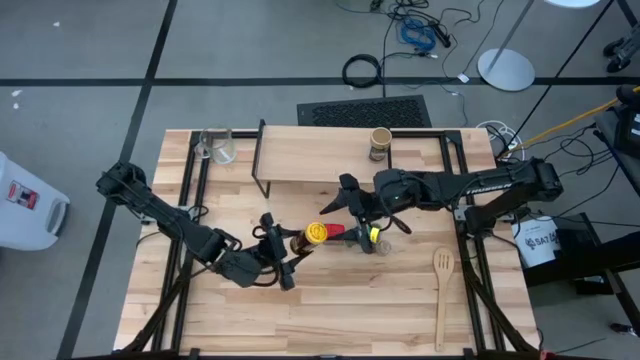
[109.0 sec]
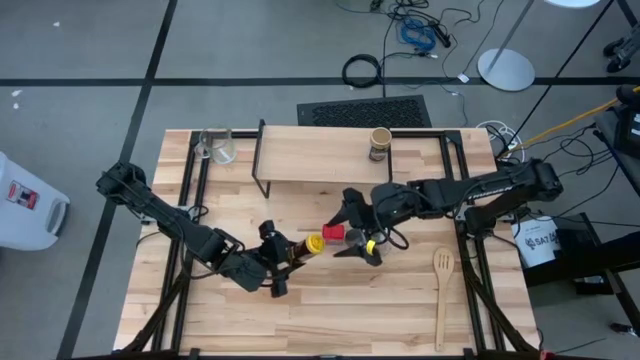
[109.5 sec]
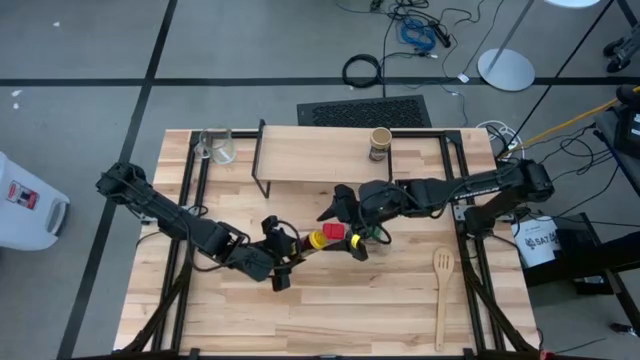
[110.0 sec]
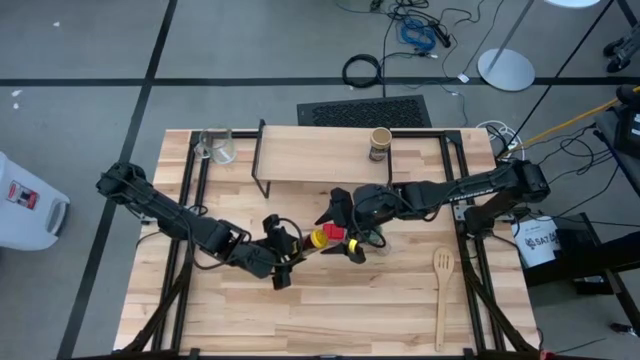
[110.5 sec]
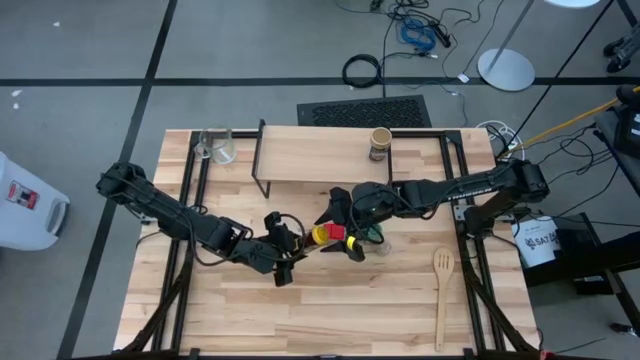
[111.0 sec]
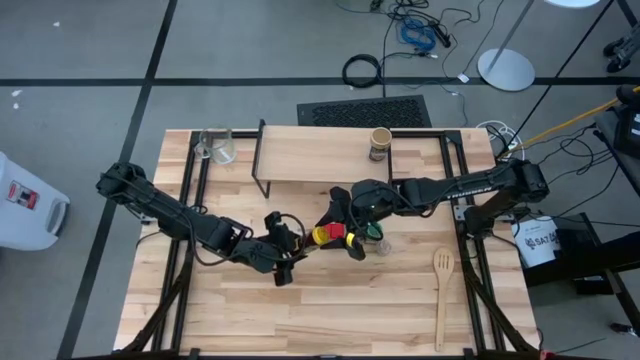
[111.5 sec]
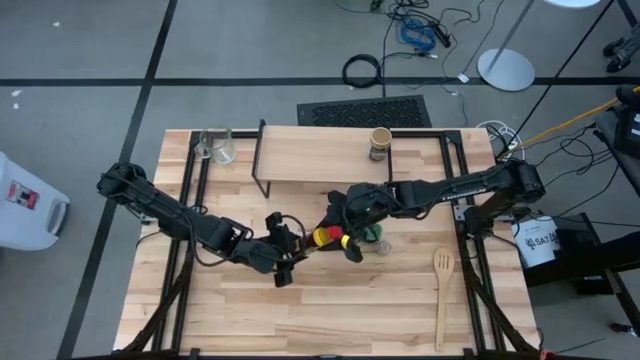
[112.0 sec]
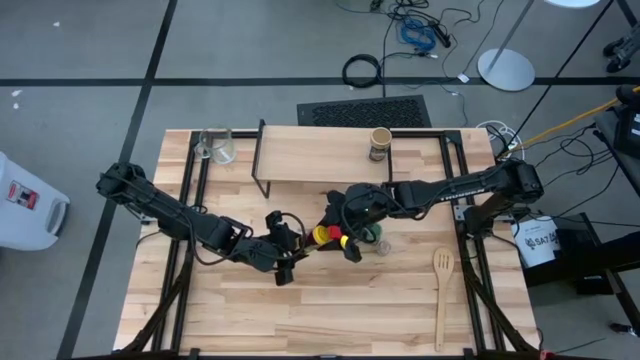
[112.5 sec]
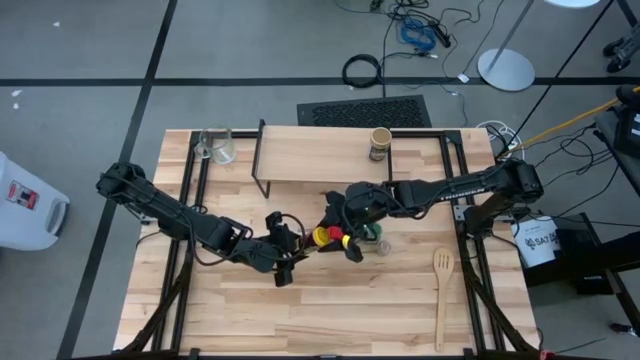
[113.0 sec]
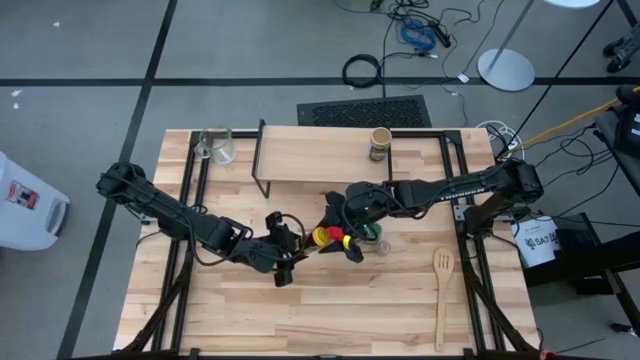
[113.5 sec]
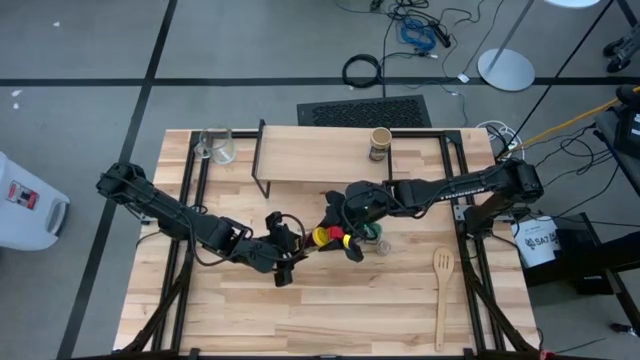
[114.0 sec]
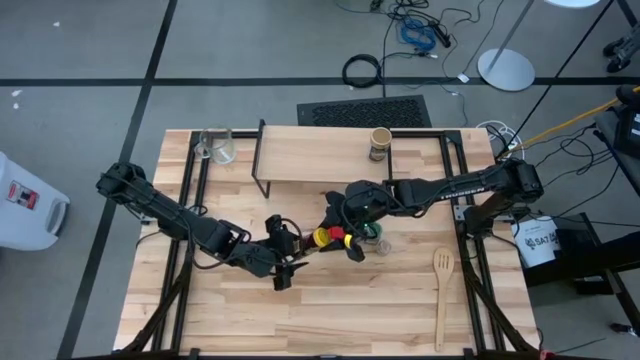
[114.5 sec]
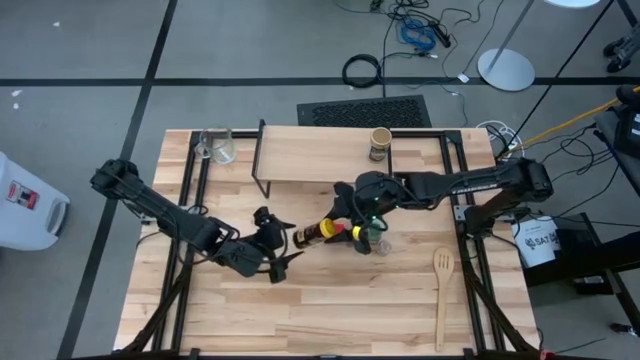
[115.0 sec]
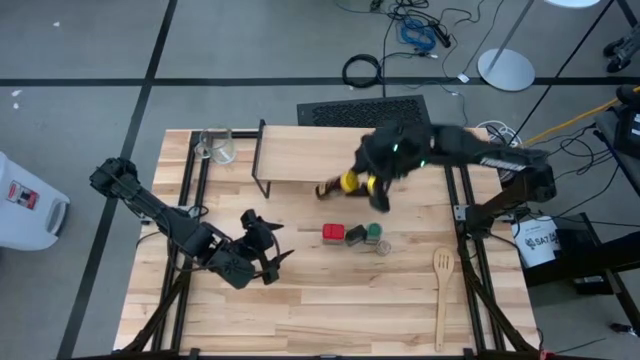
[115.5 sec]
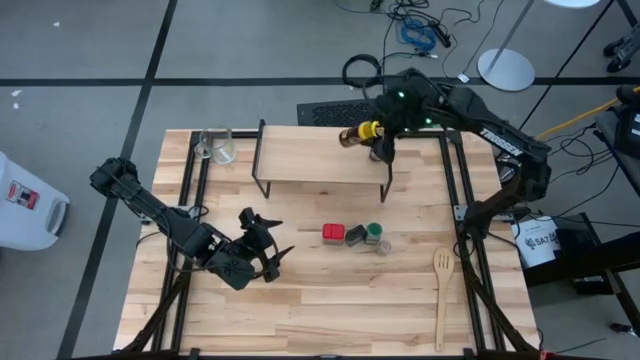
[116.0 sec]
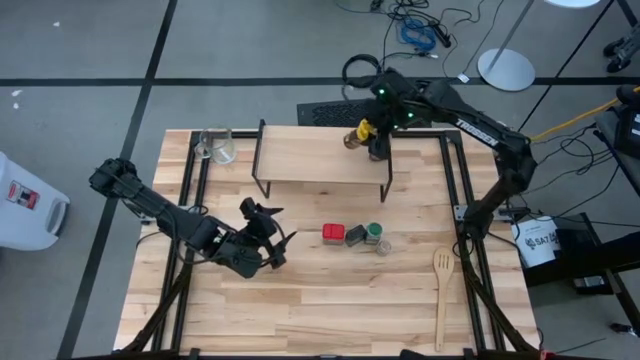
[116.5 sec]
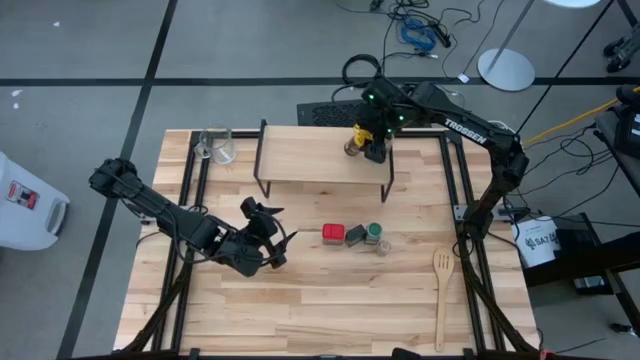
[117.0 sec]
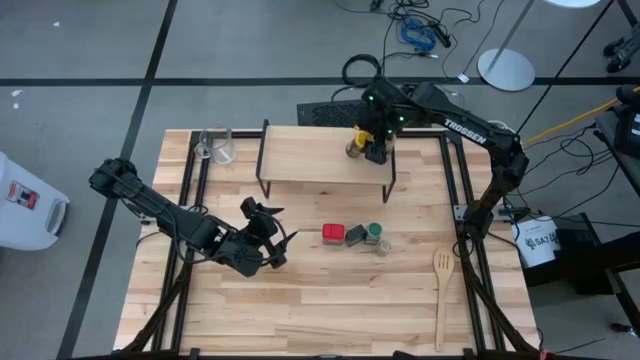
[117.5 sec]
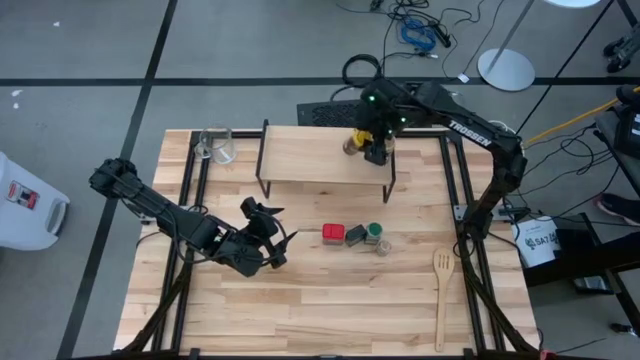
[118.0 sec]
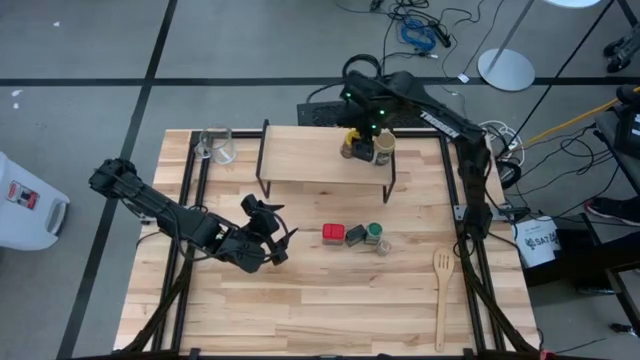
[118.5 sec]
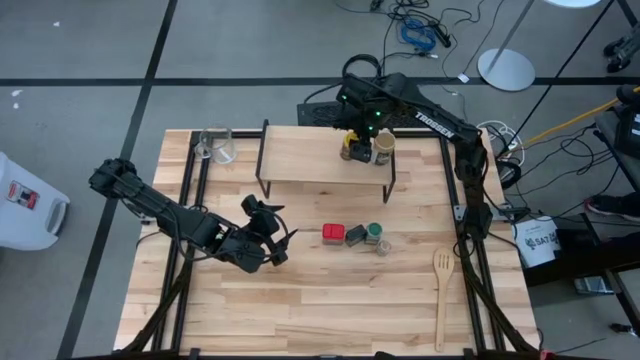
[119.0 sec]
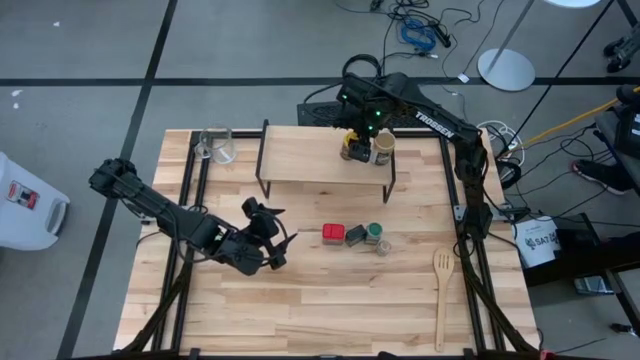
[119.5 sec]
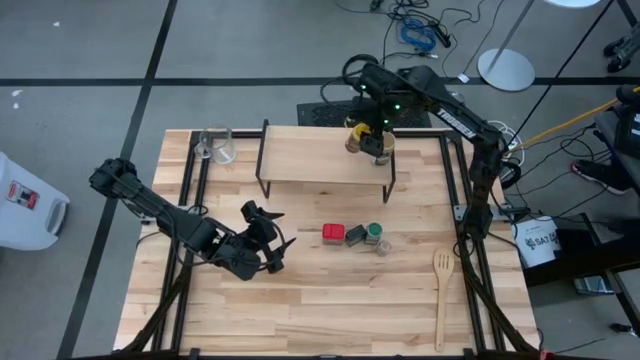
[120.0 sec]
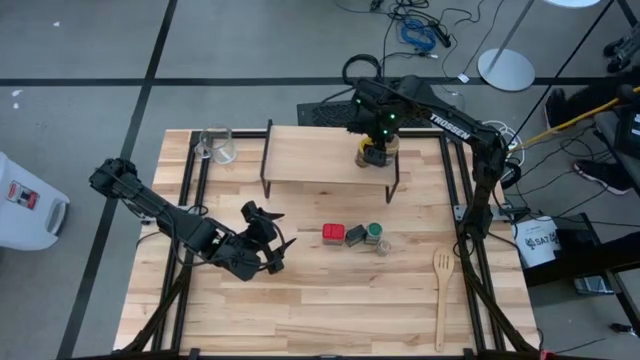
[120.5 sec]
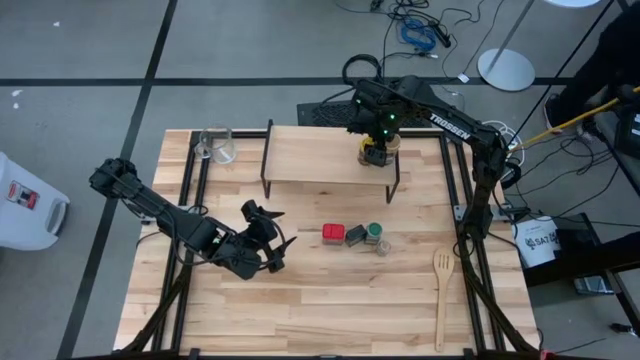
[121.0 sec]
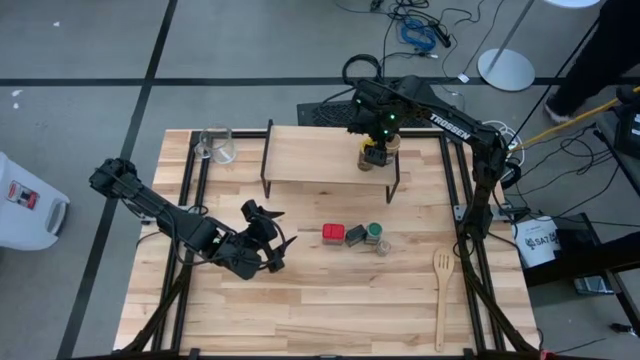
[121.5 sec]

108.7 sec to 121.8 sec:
Task: Shelf spices
Put the yellow seasoning bottle on the shelf
